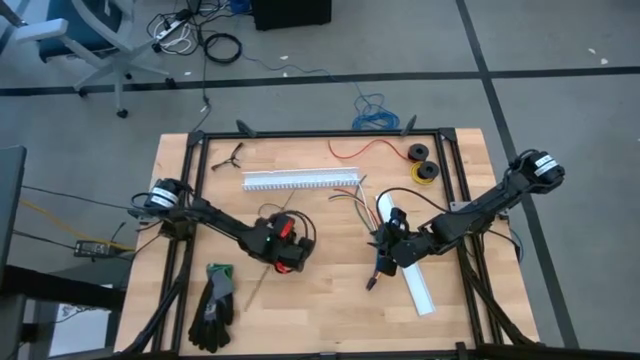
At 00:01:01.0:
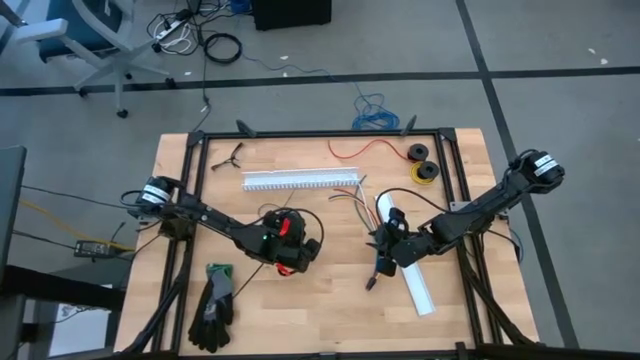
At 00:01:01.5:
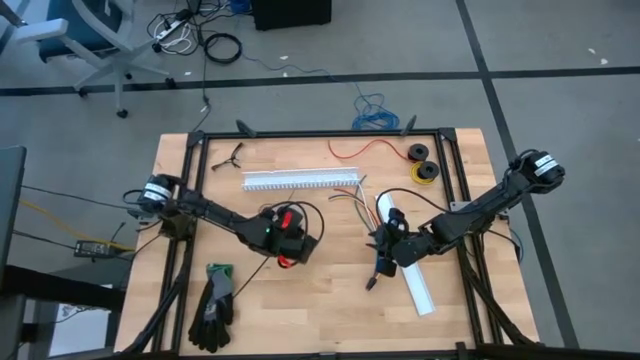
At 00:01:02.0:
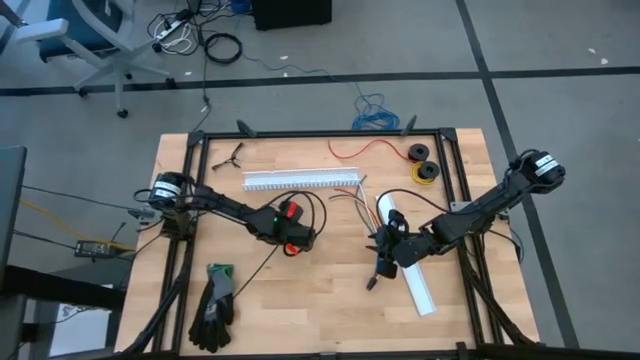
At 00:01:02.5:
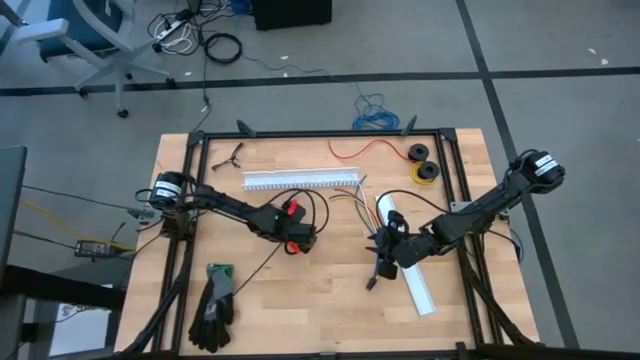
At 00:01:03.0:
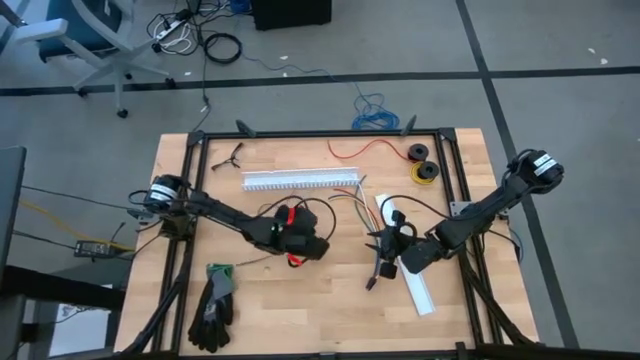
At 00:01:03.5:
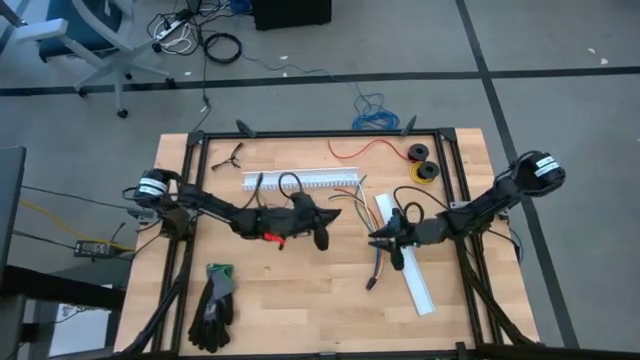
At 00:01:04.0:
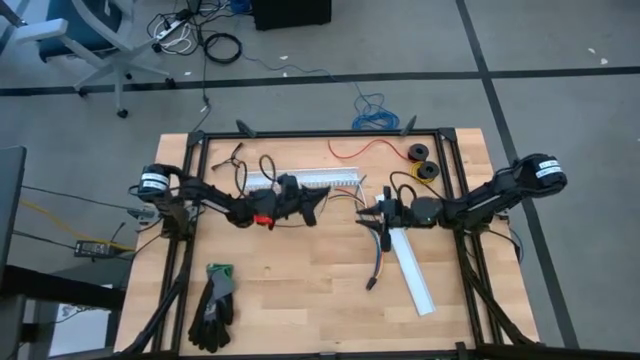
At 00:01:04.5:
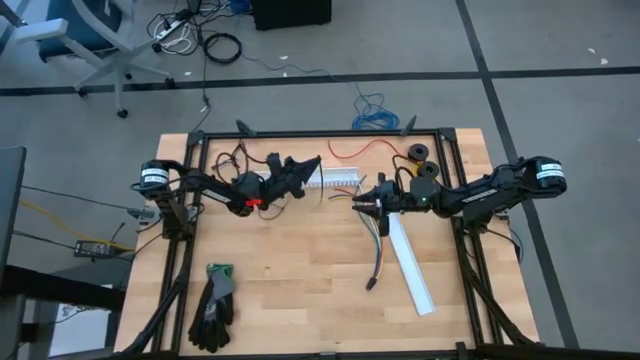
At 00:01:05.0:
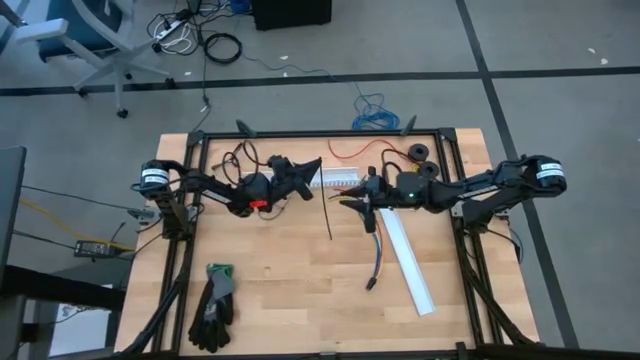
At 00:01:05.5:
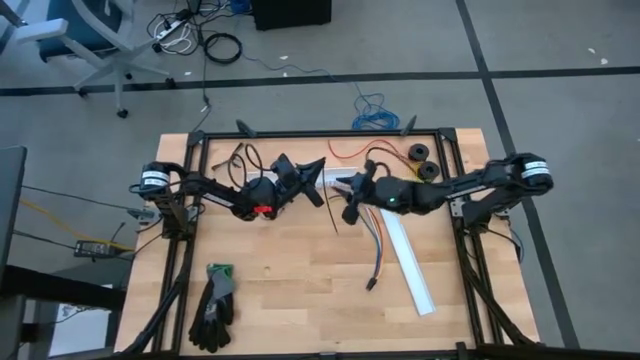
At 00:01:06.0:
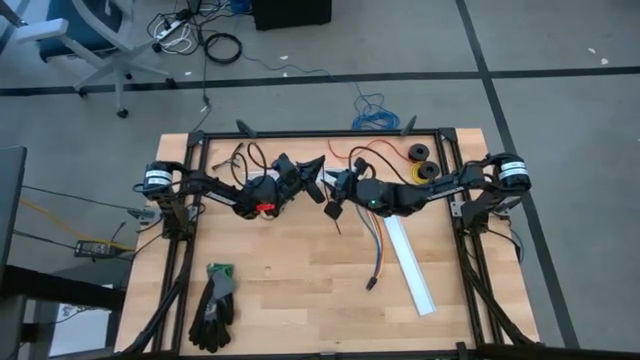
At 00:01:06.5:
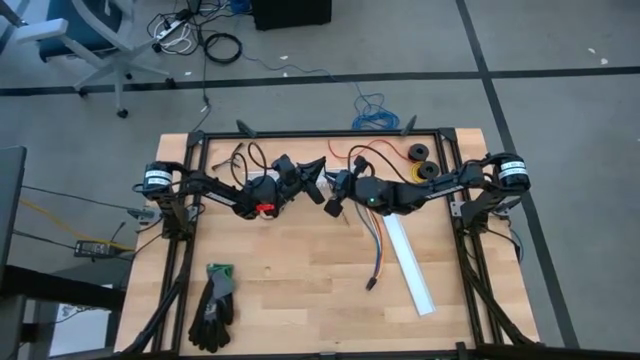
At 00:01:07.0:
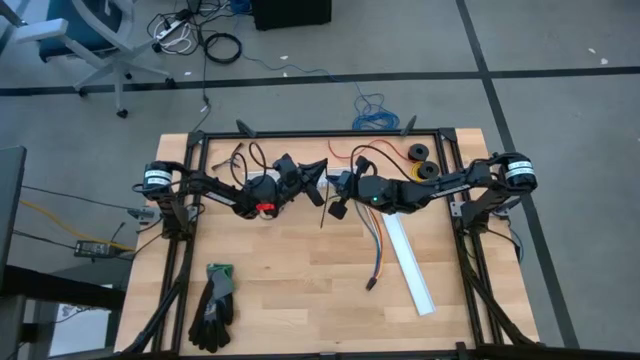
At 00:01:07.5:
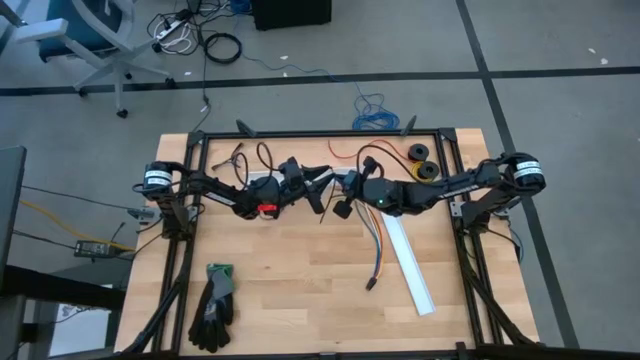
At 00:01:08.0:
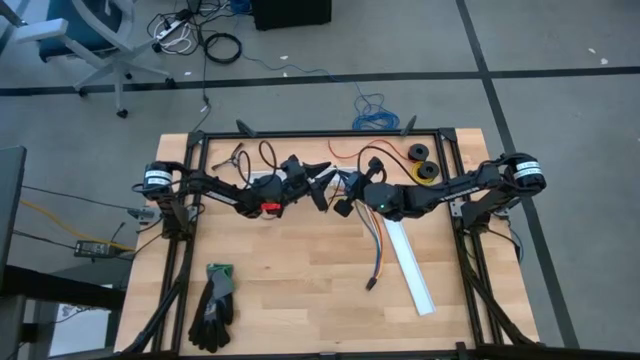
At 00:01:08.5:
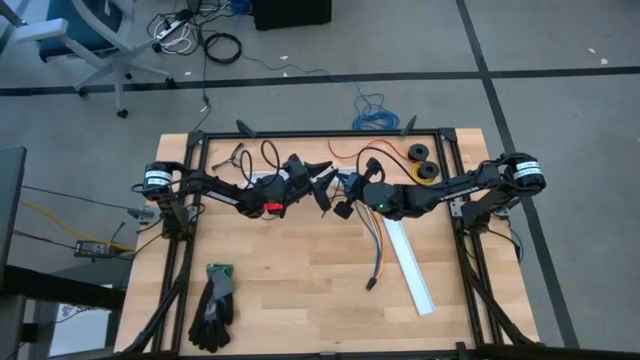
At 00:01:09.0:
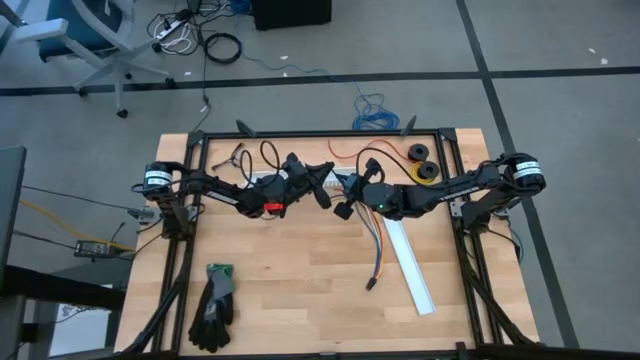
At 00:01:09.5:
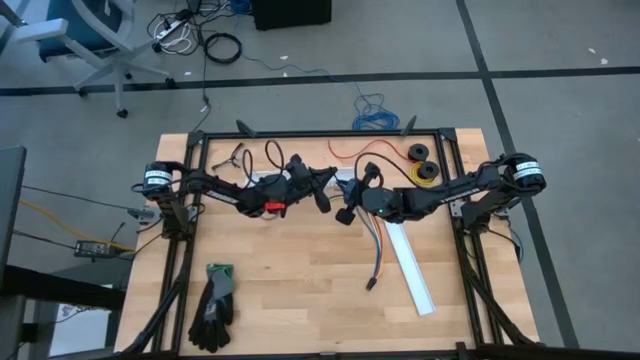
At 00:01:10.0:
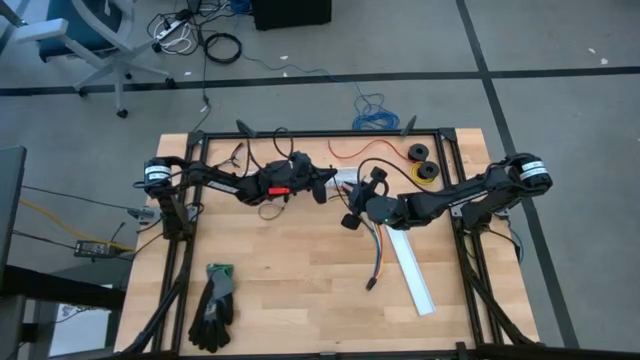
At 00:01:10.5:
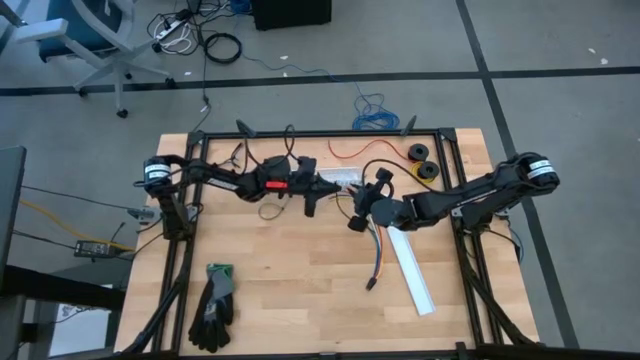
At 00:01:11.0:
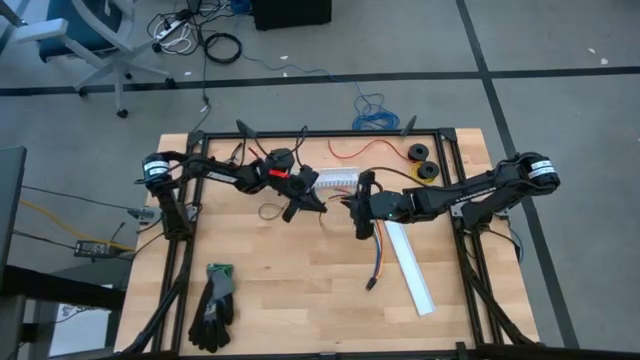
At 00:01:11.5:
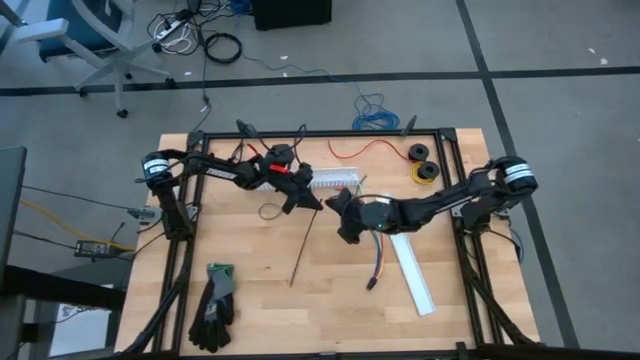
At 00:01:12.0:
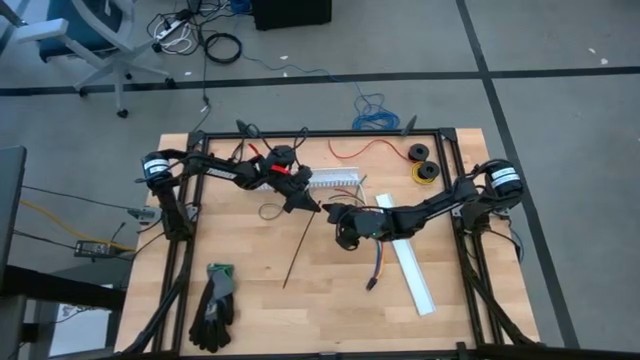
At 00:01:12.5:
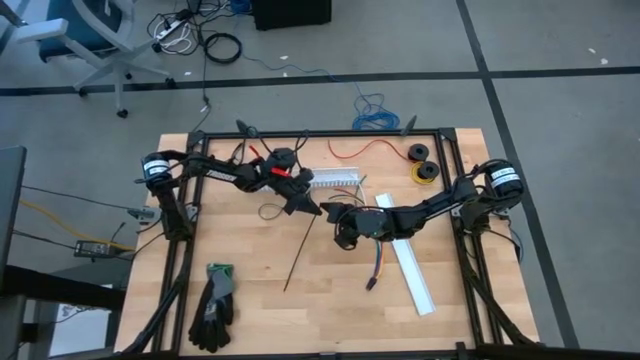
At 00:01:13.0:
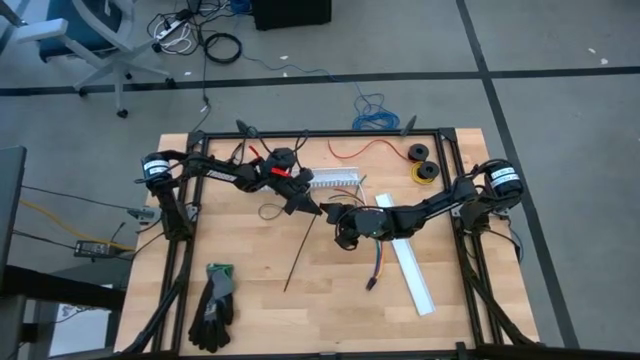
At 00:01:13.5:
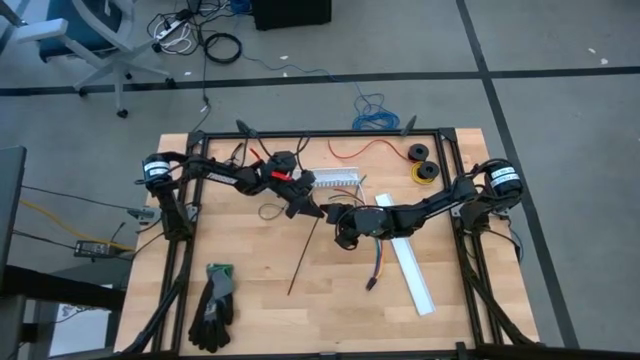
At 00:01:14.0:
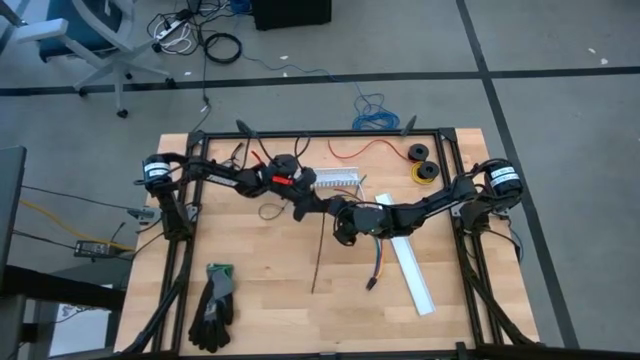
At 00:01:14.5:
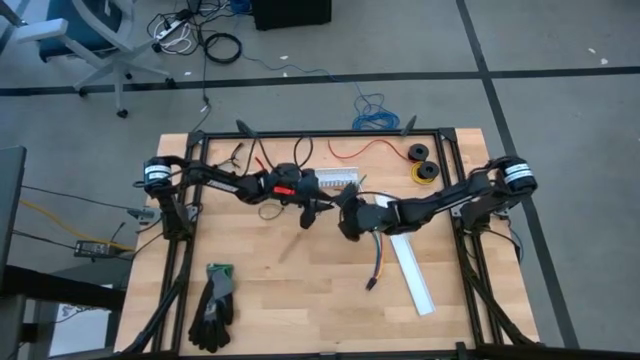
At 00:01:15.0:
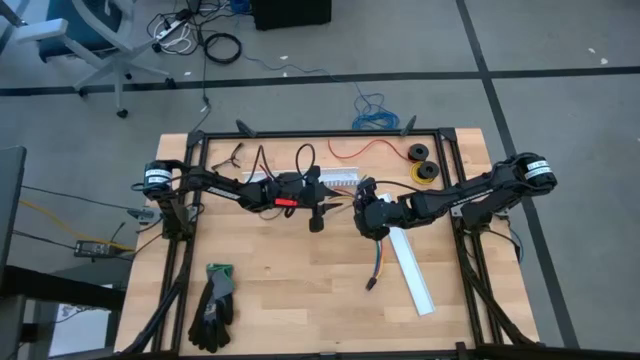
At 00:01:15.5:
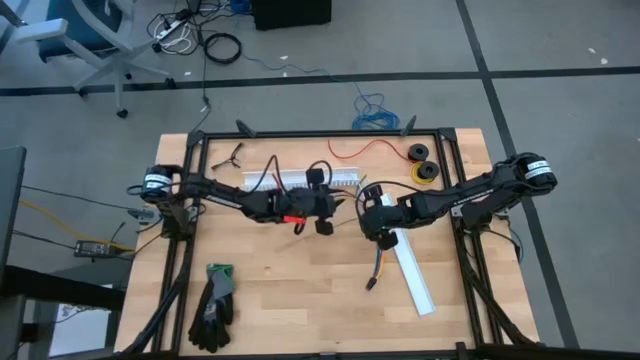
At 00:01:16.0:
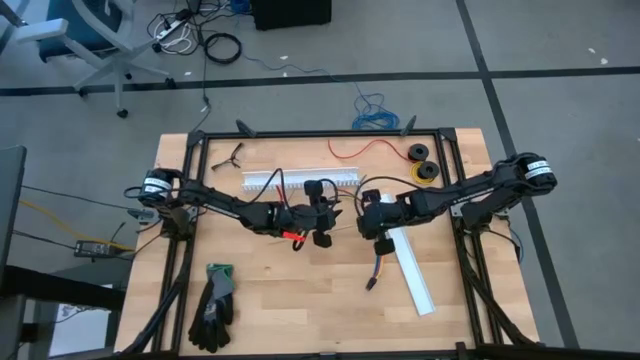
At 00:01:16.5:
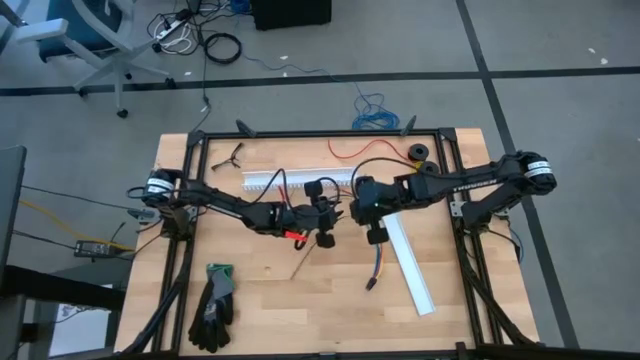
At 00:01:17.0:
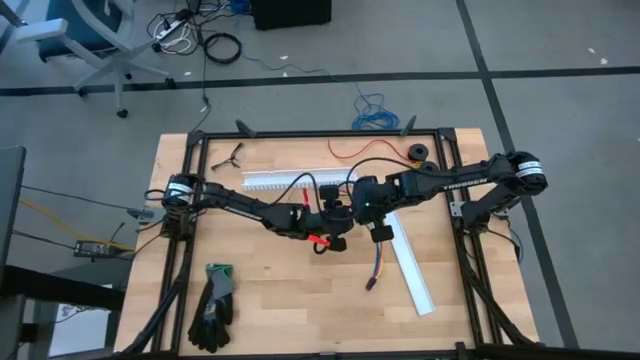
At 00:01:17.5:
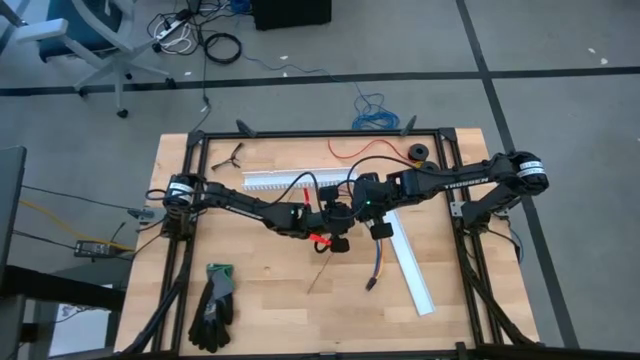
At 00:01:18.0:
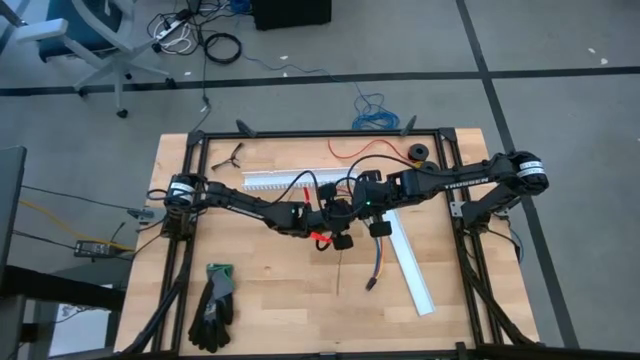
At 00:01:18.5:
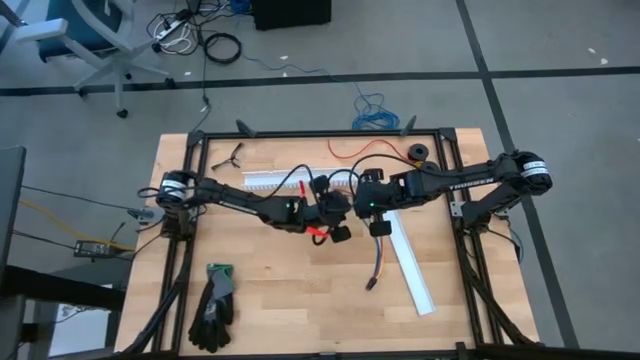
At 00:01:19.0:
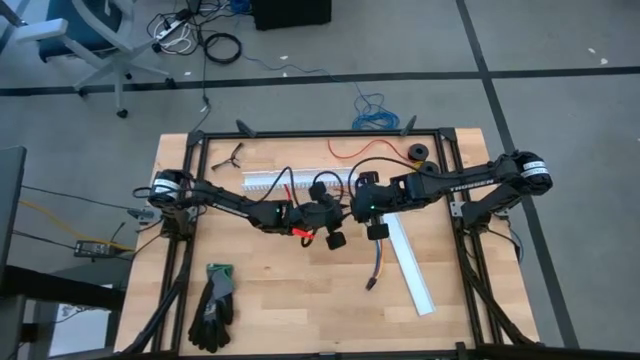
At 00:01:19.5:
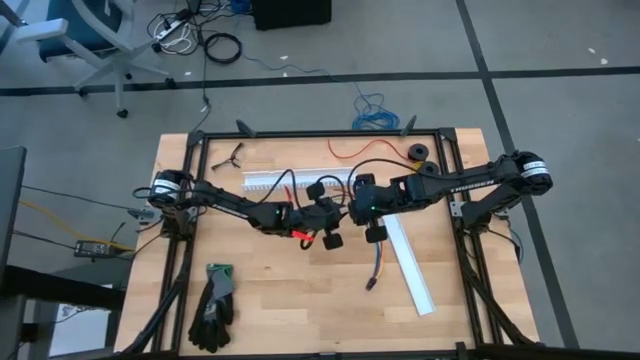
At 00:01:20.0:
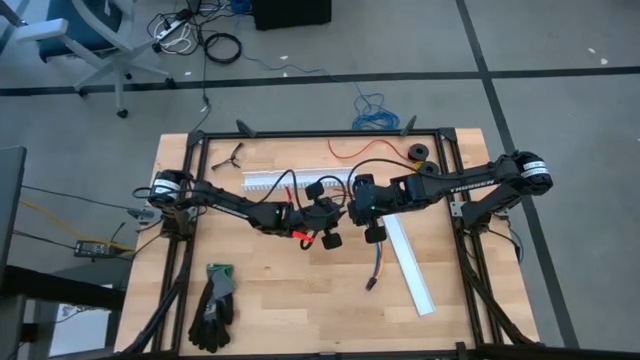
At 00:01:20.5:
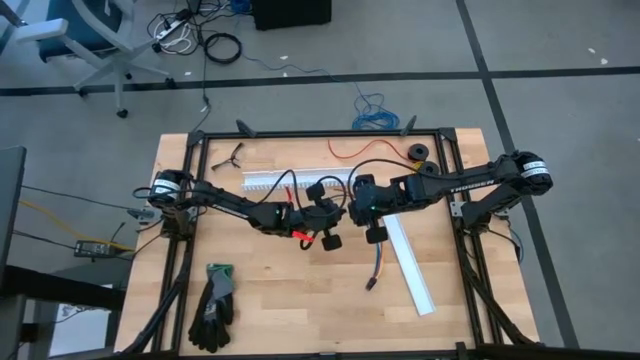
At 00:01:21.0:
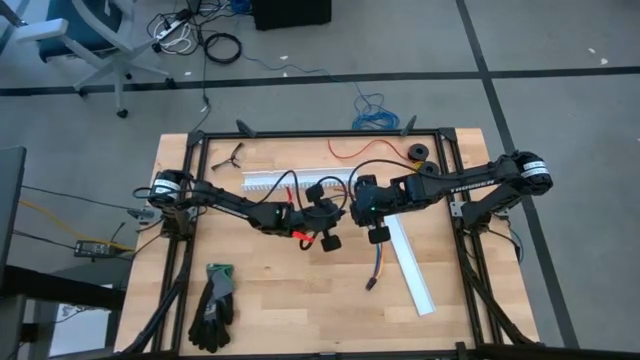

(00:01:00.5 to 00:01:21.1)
Task: Ziptie cables
Wrap the cable wires with black zip tie
